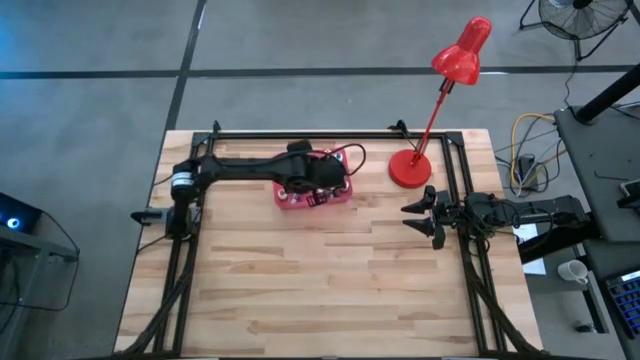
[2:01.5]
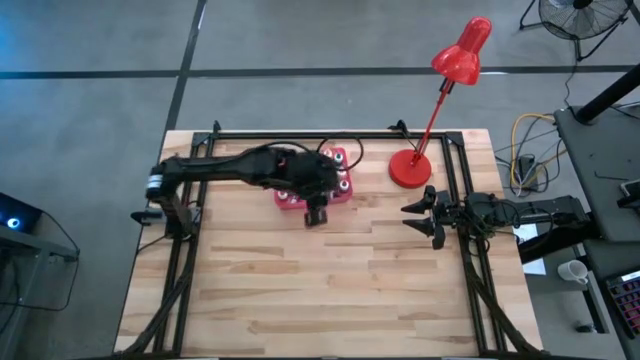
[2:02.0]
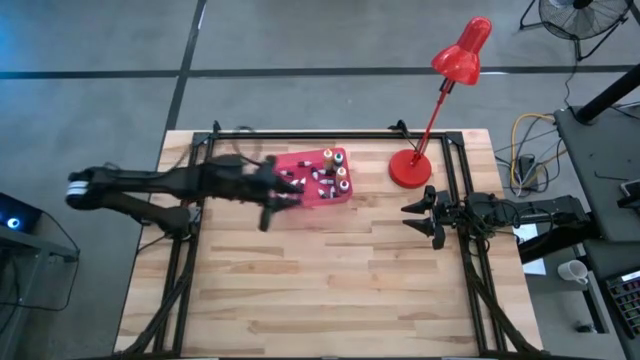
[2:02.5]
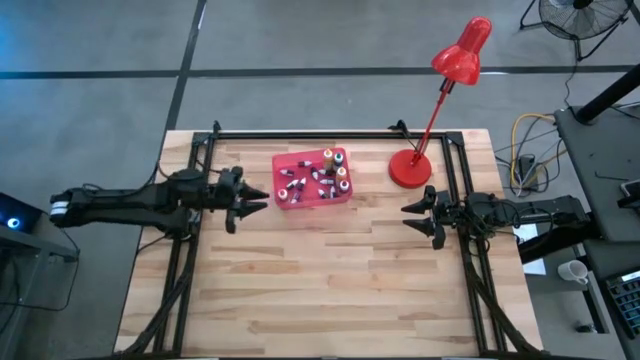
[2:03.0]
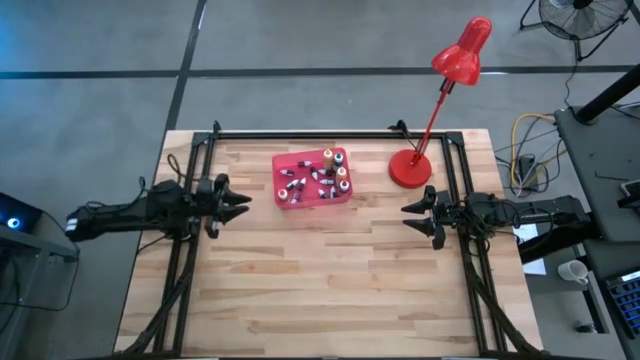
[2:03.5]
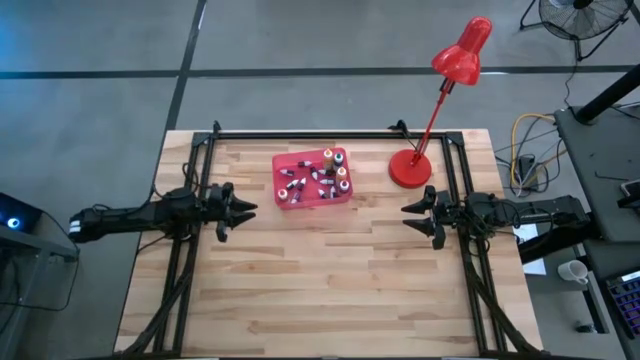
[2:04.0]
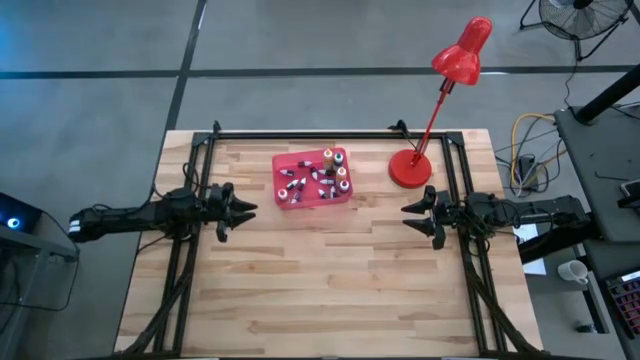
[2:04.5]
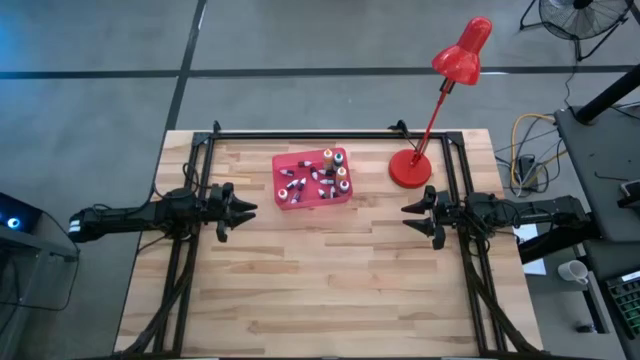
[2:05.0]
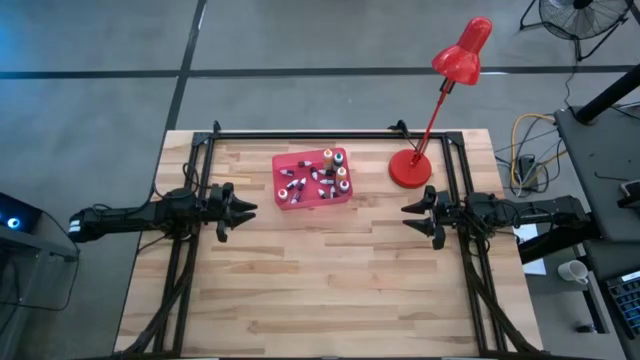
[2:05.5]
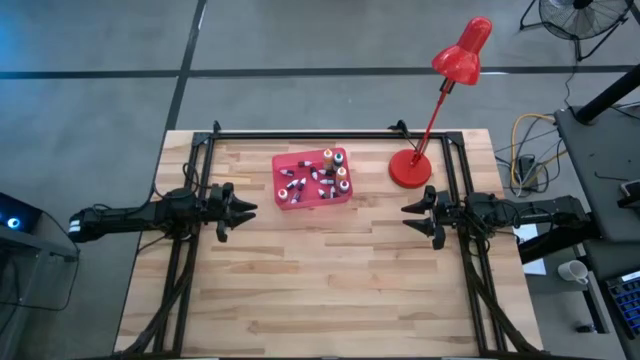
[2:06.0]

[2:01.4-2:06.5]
Task: Pick & Place food coloring
Return to Home Position

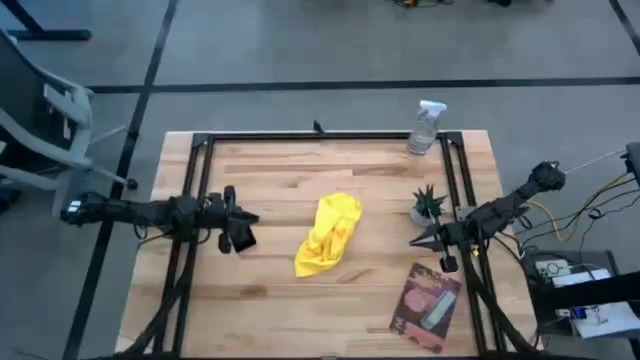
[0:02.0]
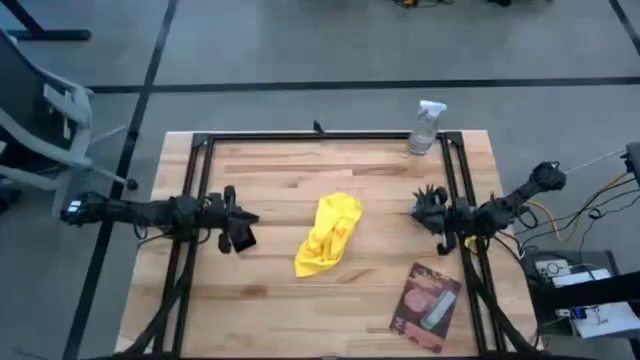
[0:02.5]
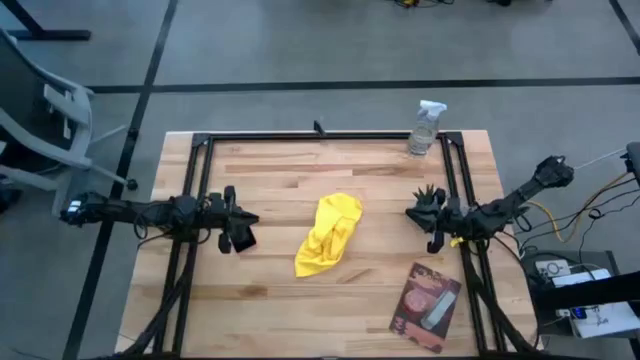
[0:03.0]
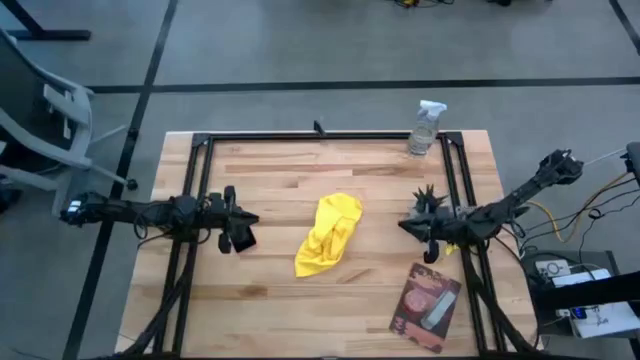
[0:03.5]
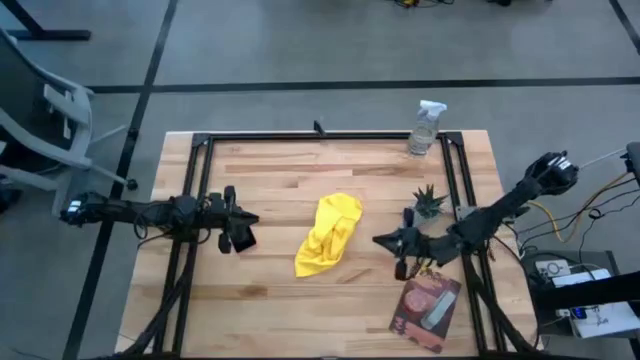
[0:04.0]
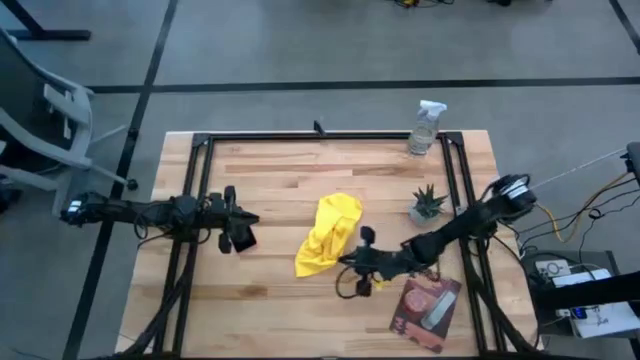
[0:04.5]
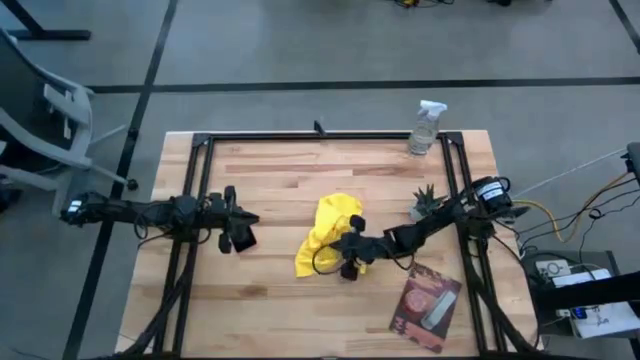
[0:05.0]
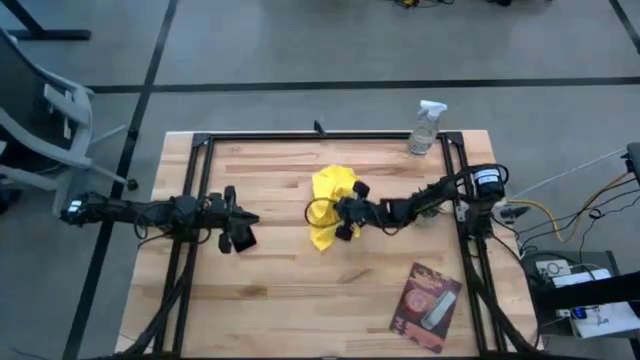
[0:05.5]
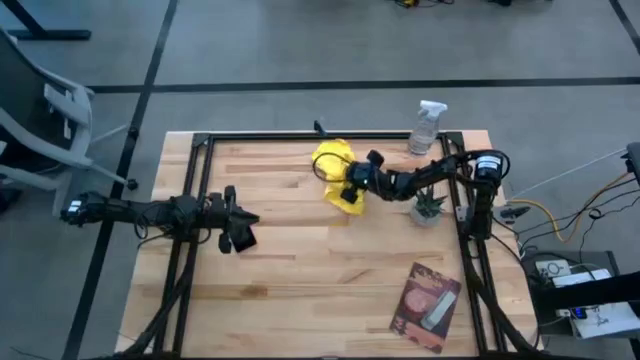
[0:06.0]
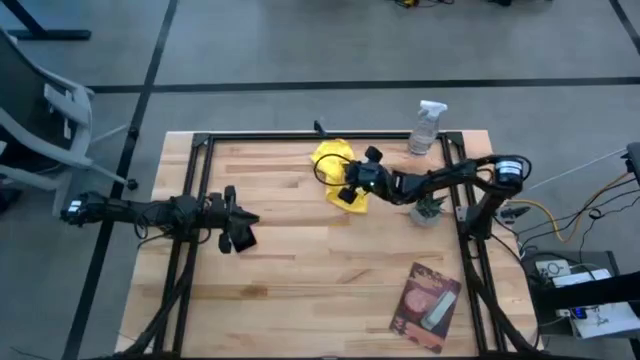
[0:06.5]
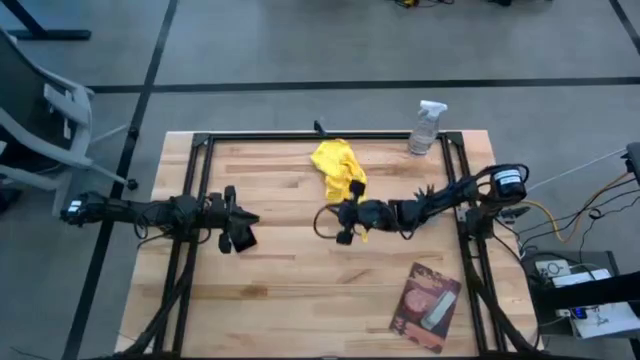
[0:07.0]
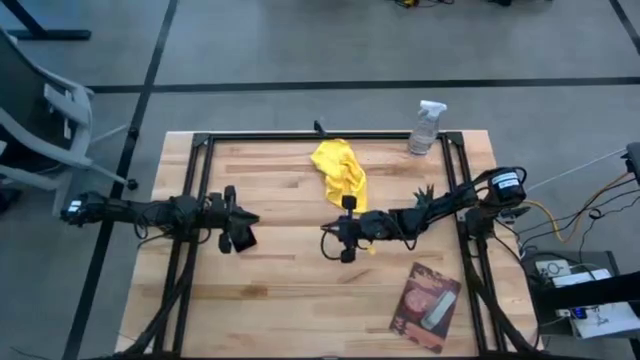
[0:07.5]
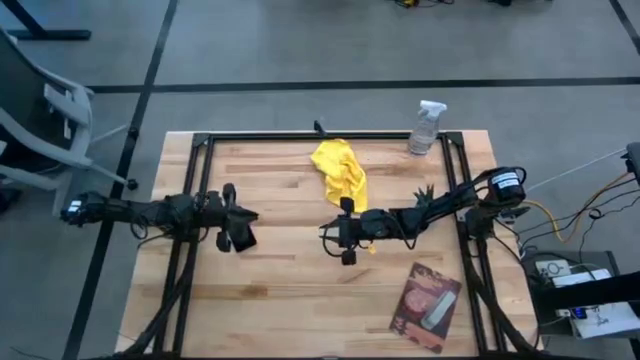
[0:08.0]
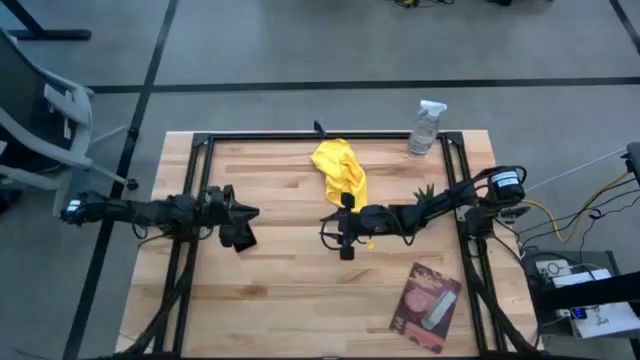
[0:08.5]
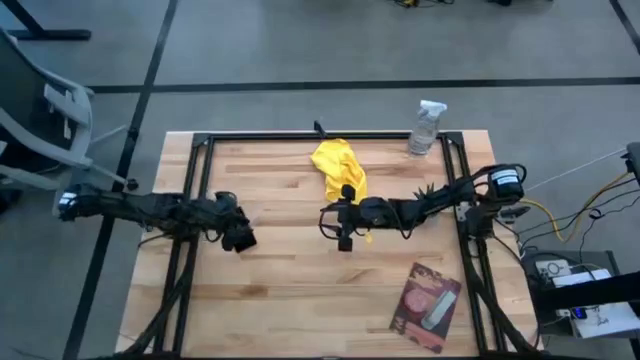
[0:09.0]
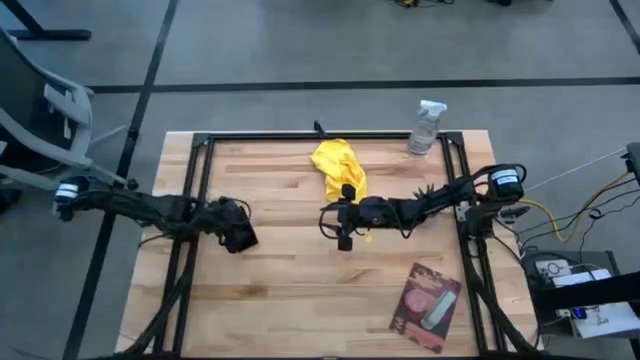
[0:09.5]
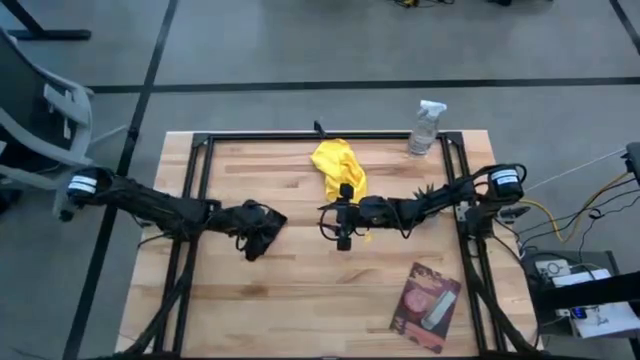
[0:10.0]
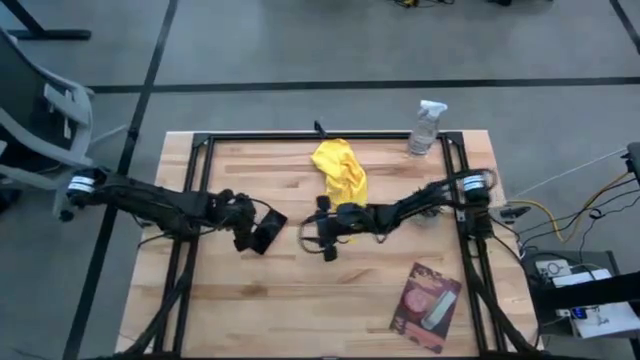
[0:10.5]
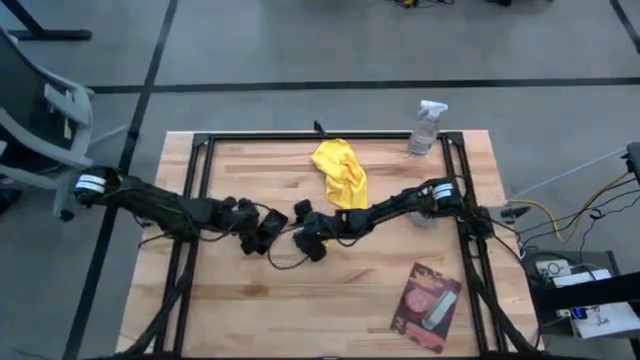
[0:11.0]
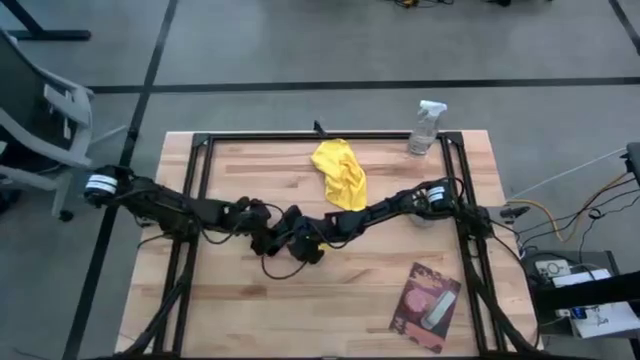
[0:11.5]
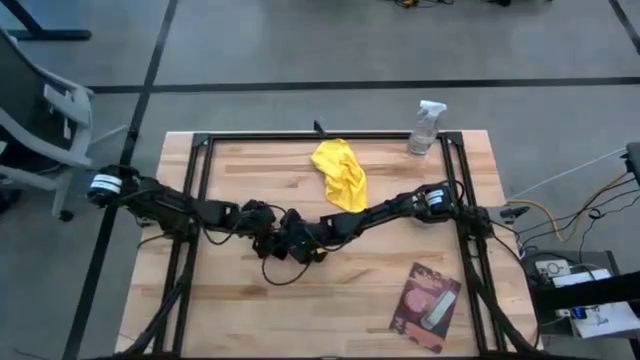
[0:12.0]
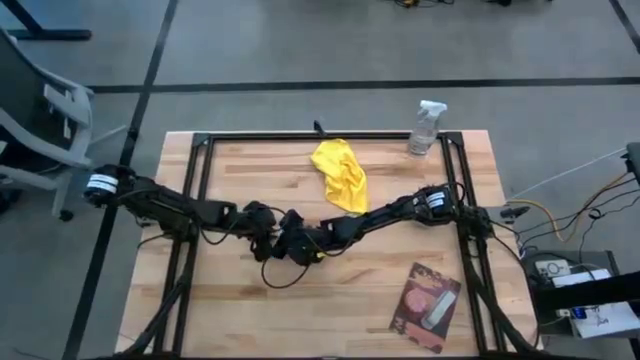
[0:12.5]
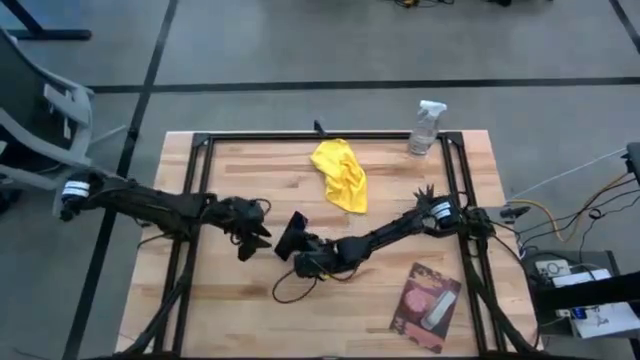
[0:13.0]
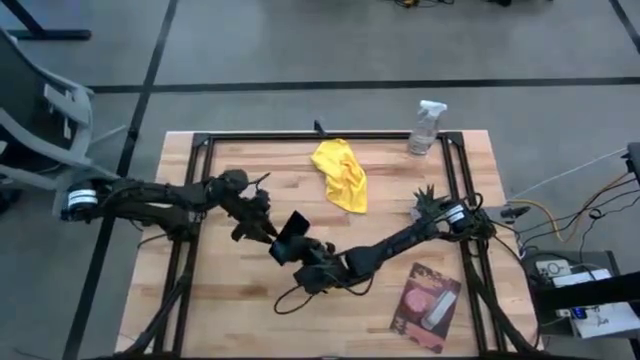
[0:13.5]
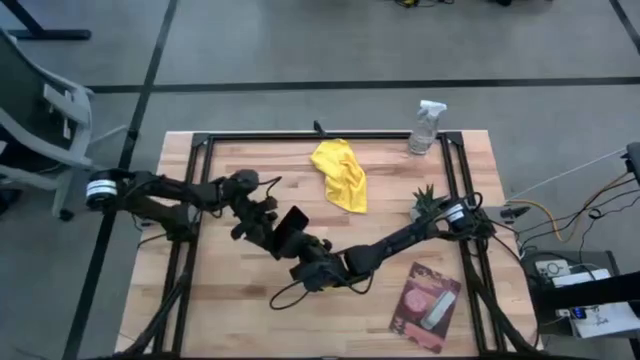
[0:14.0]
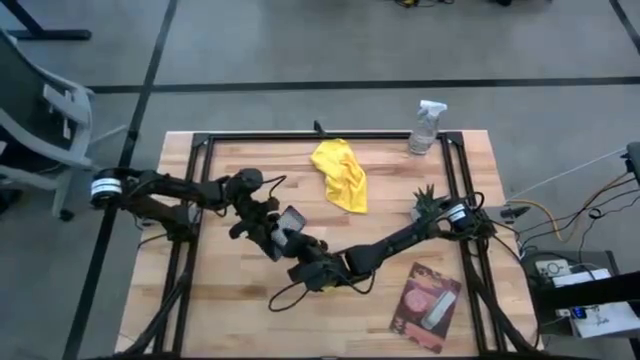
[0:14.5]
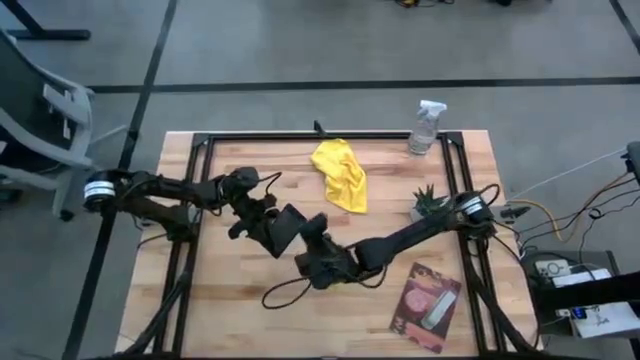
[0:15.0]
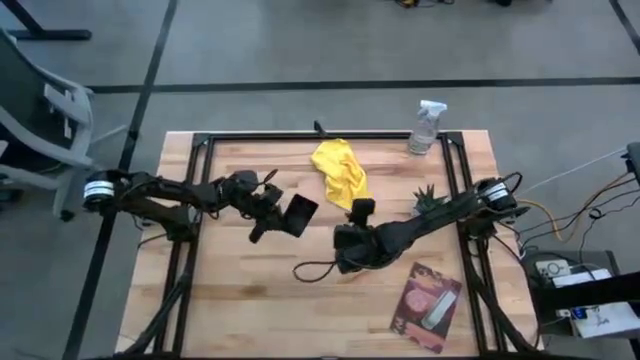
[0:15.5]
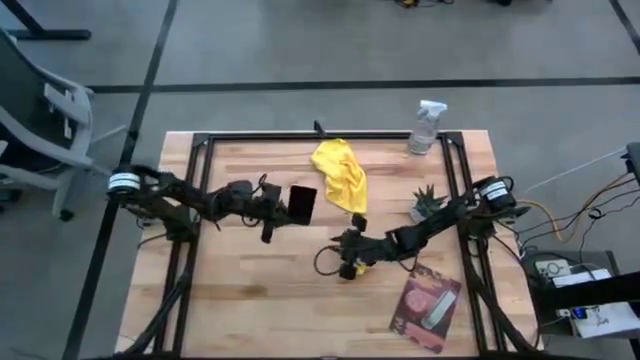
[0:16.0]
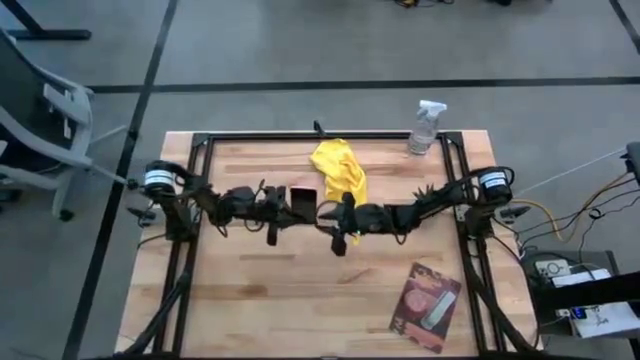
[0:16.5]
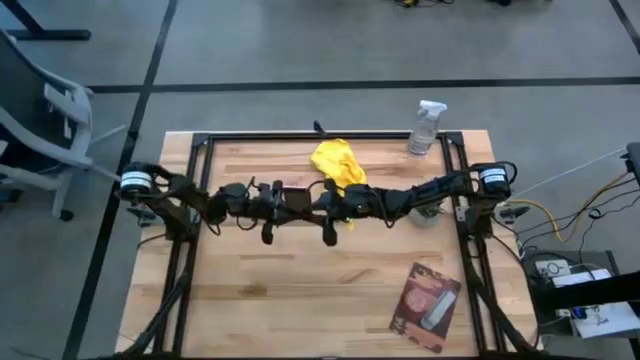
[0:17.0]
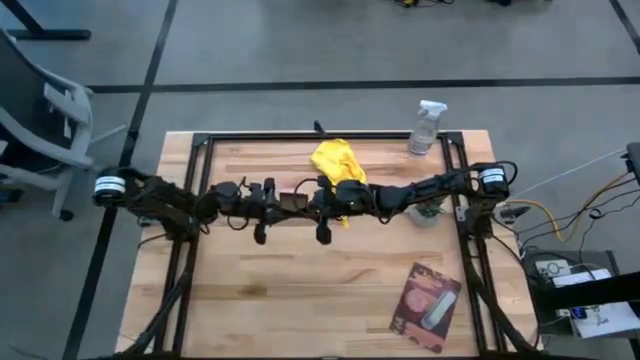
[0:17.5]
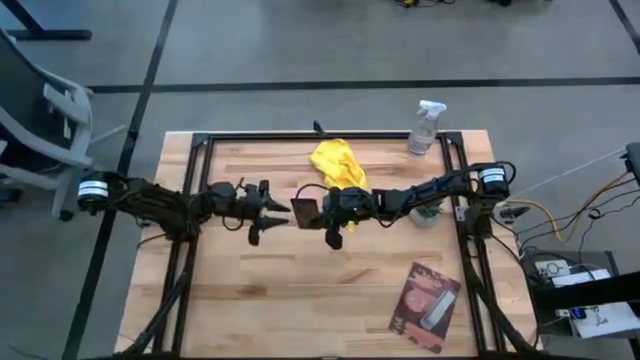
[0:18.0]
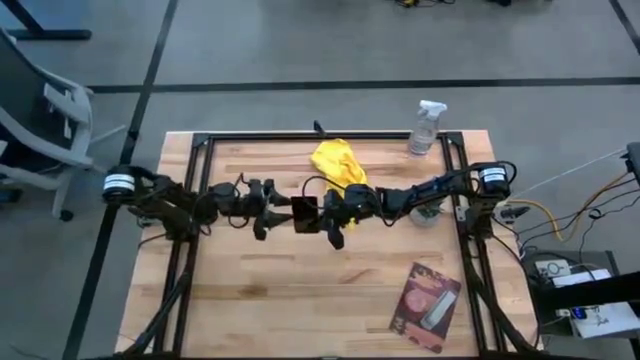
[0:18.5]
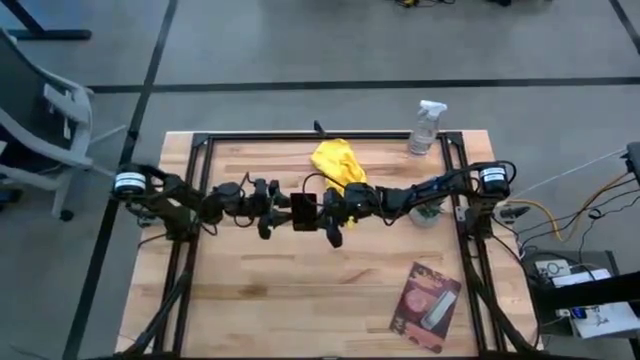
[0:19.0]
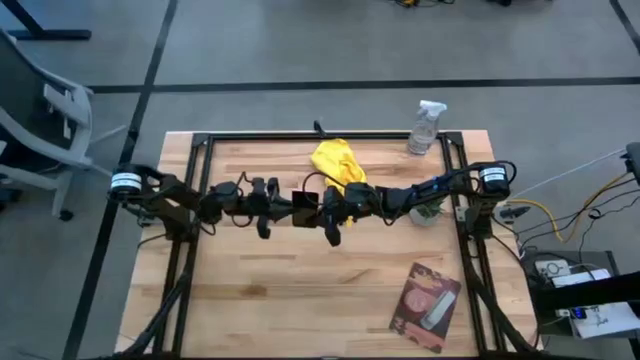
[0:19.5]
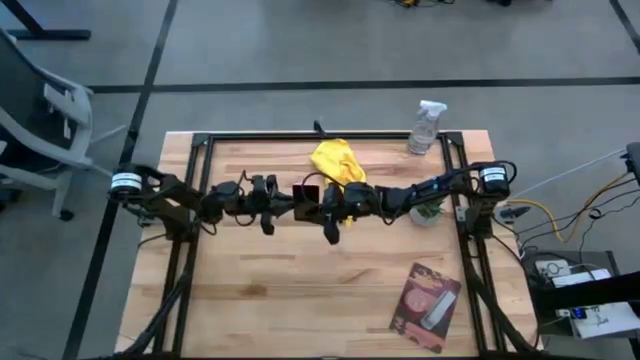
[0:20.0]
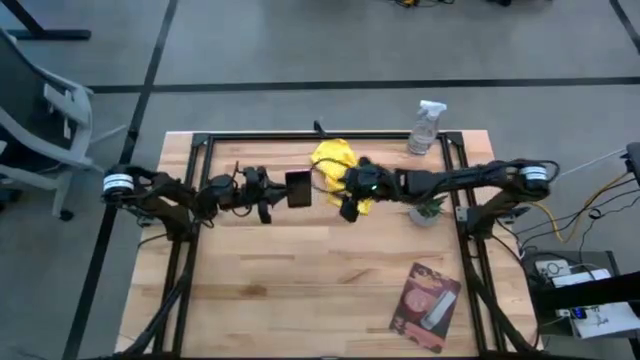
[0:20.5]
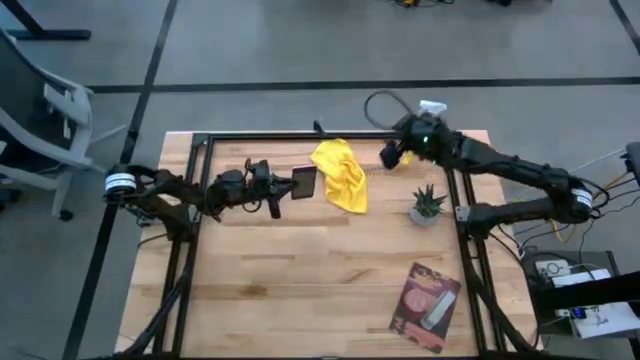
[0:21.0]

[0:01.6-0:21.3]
Task: Apply microfiber cloth
Spray the pink cellphone using the spray bottle
